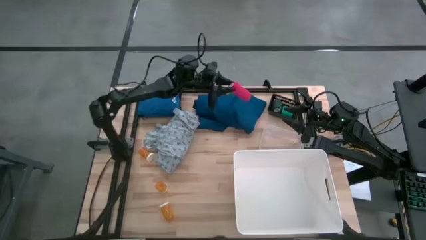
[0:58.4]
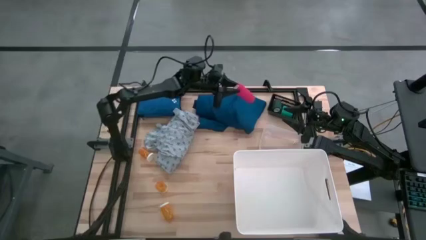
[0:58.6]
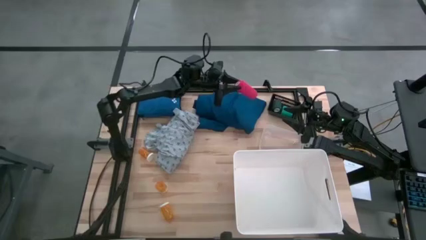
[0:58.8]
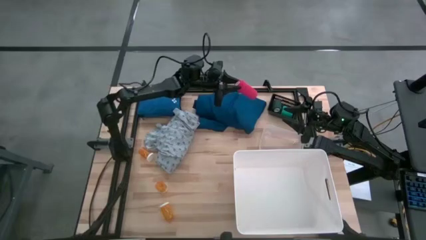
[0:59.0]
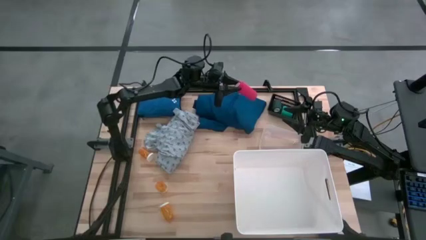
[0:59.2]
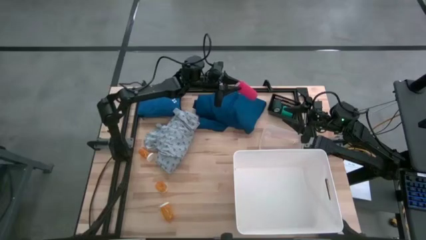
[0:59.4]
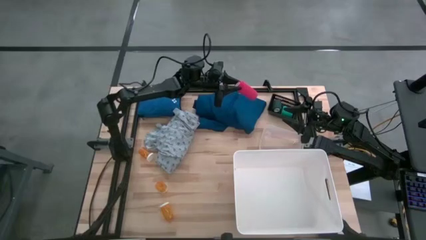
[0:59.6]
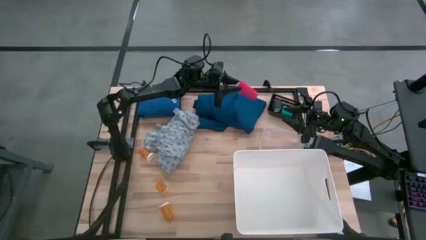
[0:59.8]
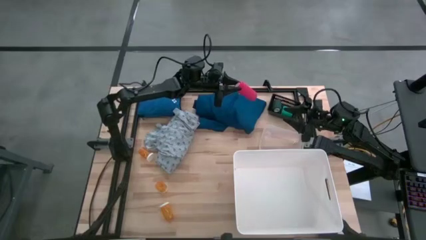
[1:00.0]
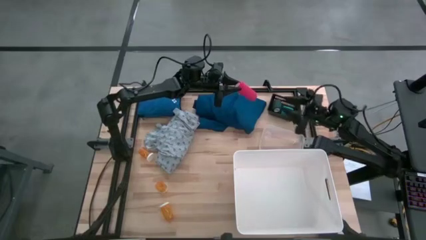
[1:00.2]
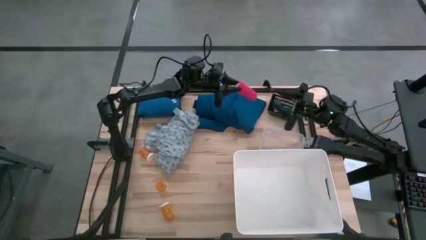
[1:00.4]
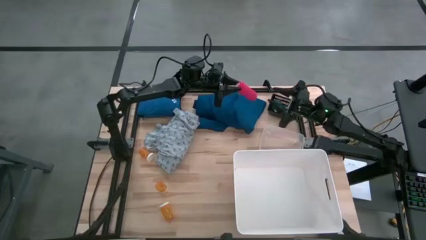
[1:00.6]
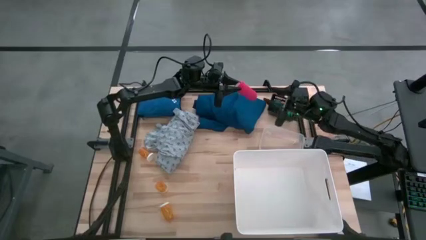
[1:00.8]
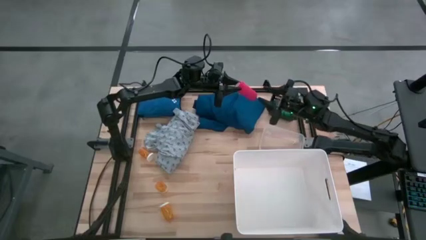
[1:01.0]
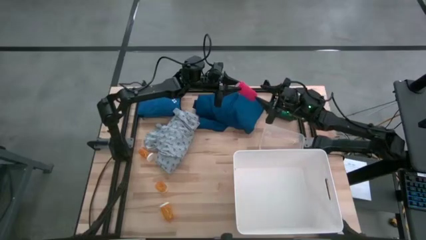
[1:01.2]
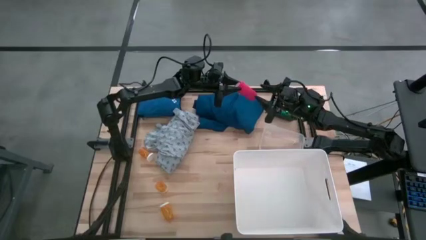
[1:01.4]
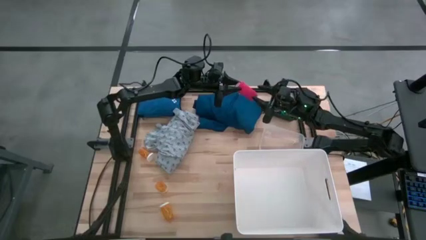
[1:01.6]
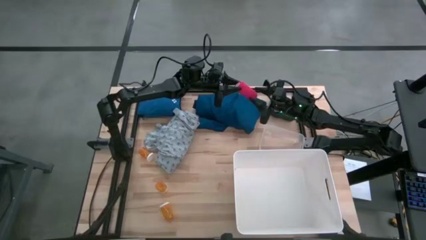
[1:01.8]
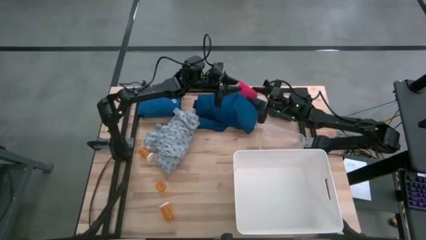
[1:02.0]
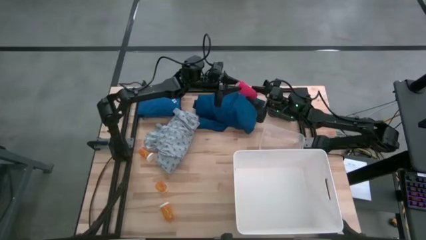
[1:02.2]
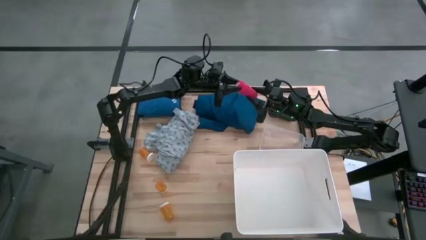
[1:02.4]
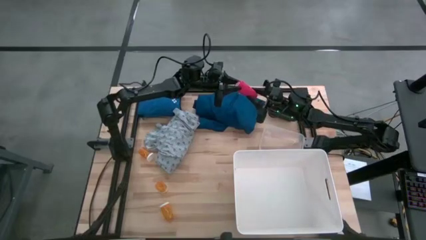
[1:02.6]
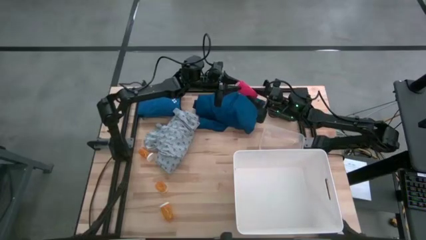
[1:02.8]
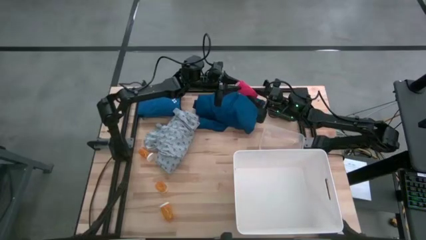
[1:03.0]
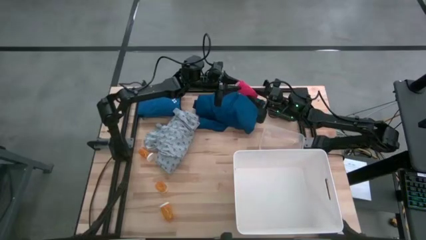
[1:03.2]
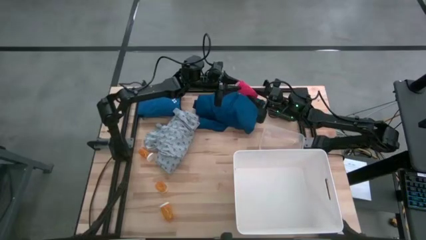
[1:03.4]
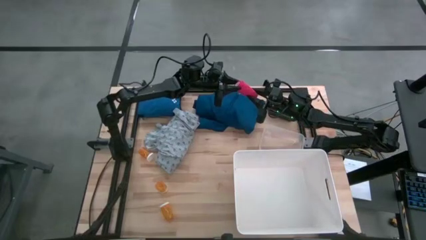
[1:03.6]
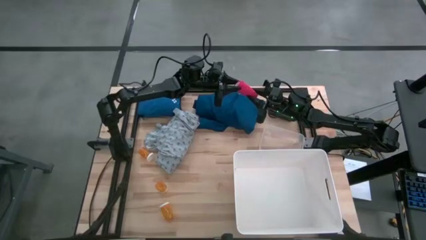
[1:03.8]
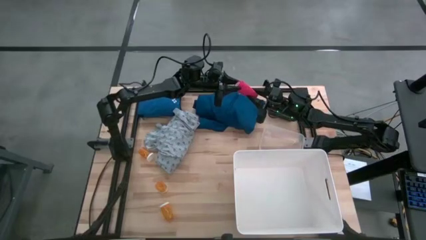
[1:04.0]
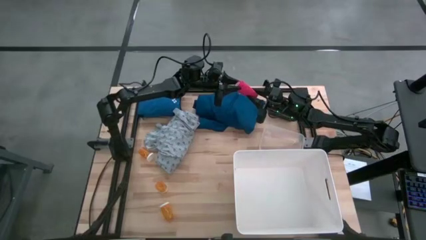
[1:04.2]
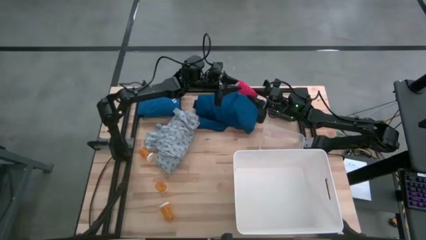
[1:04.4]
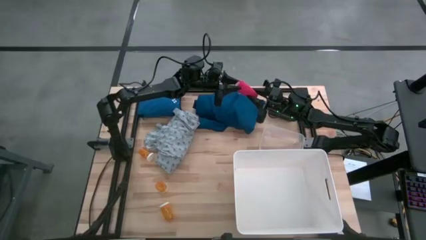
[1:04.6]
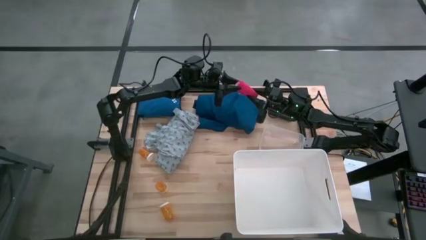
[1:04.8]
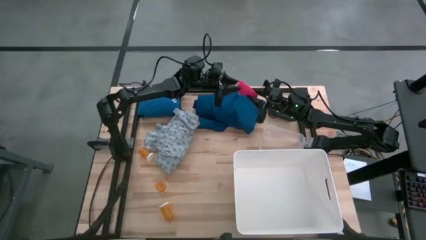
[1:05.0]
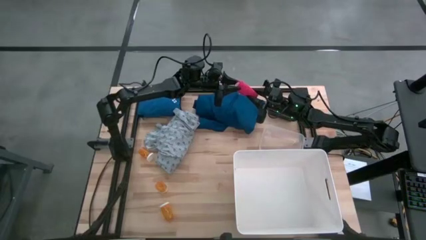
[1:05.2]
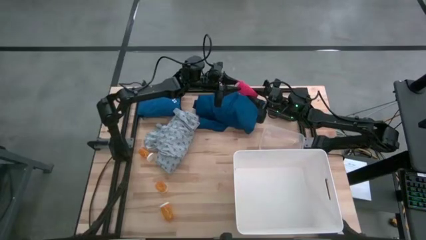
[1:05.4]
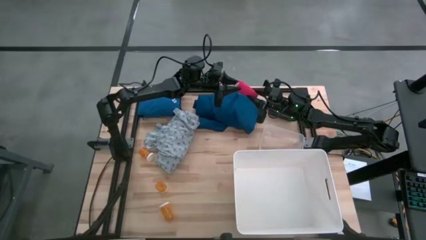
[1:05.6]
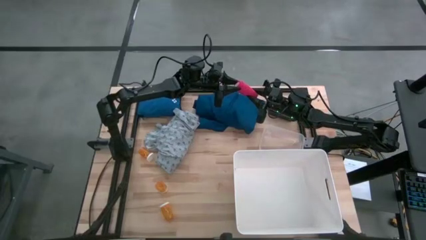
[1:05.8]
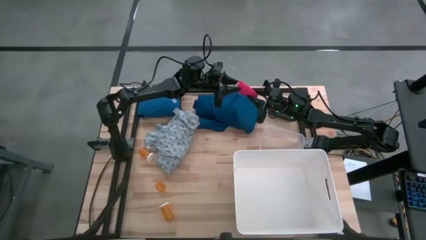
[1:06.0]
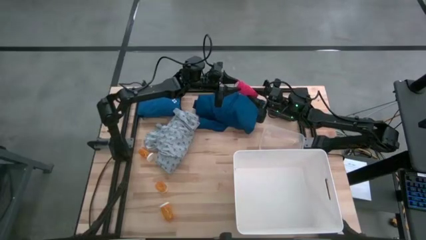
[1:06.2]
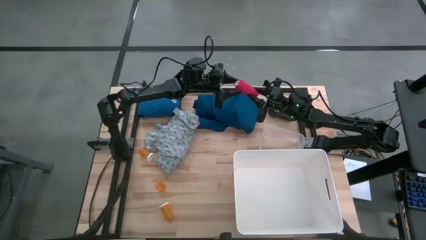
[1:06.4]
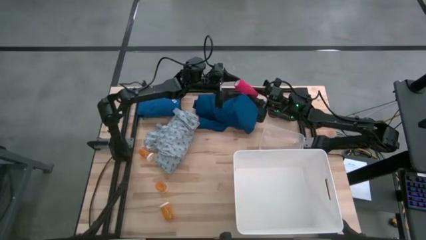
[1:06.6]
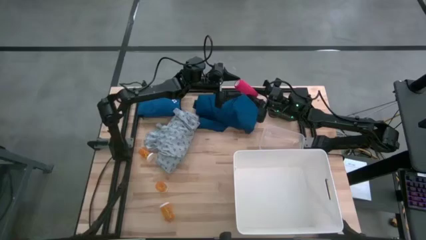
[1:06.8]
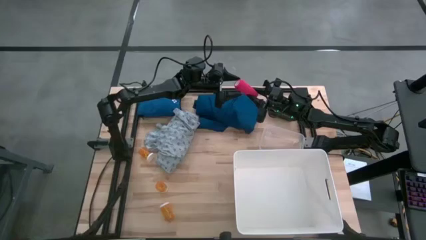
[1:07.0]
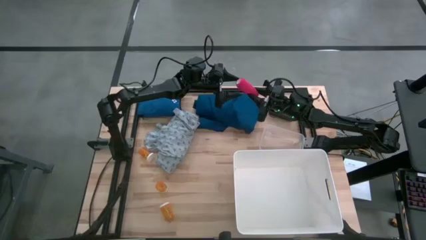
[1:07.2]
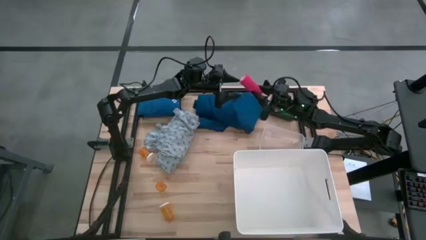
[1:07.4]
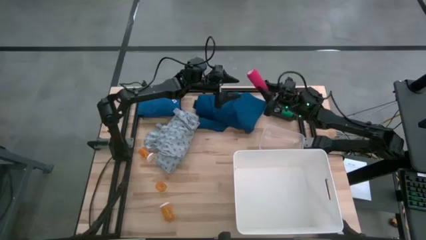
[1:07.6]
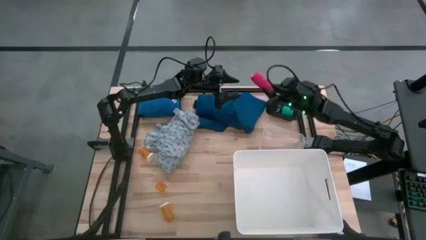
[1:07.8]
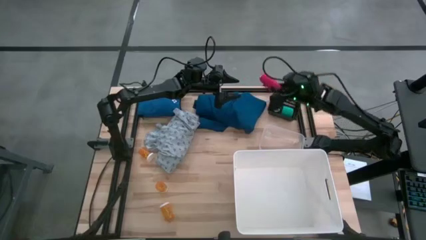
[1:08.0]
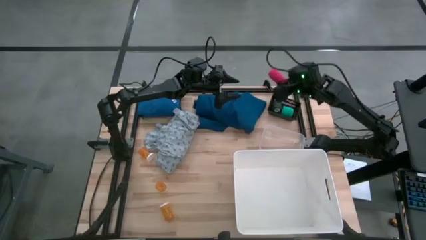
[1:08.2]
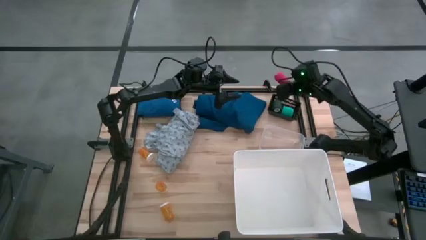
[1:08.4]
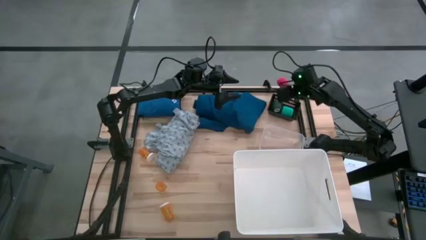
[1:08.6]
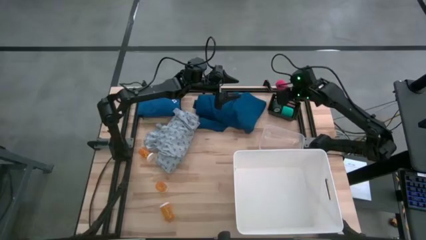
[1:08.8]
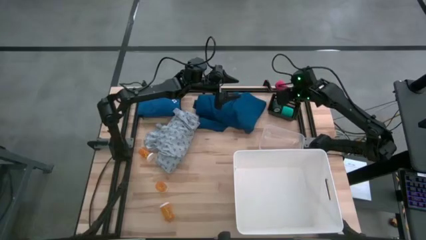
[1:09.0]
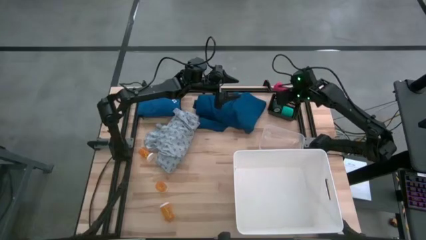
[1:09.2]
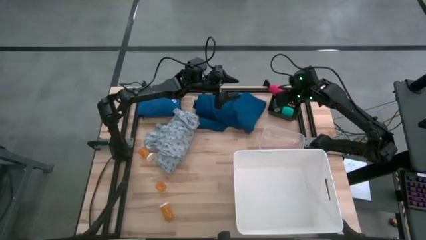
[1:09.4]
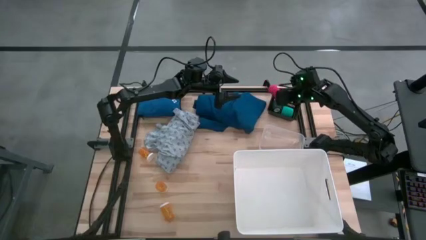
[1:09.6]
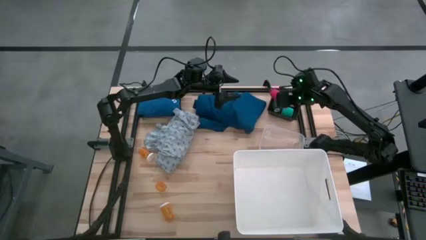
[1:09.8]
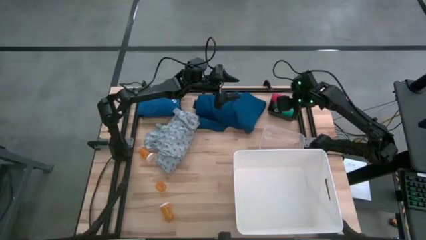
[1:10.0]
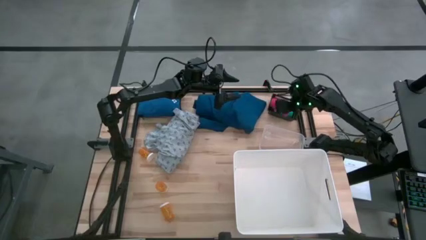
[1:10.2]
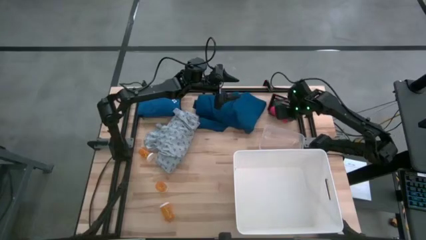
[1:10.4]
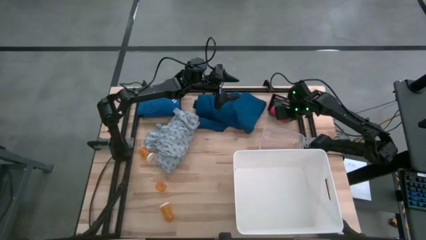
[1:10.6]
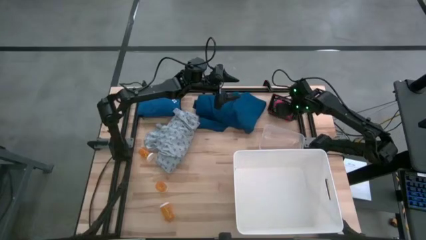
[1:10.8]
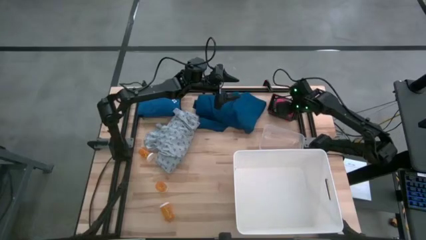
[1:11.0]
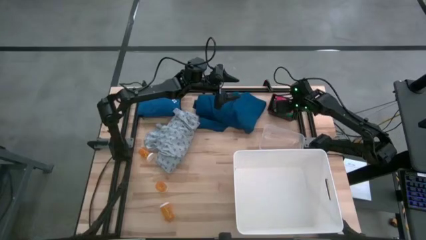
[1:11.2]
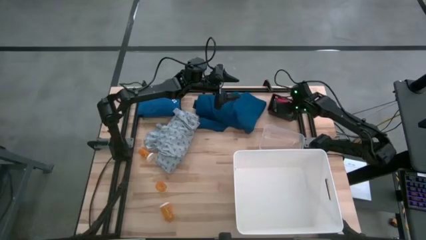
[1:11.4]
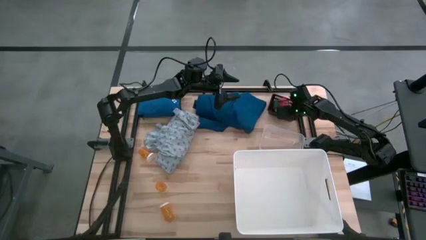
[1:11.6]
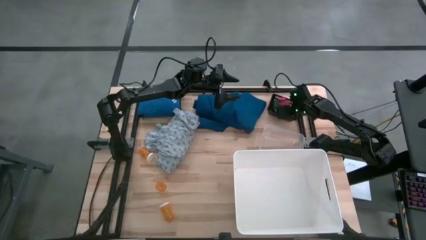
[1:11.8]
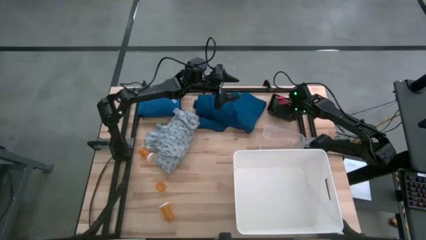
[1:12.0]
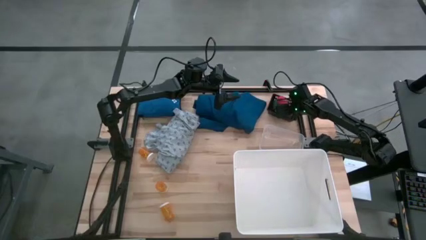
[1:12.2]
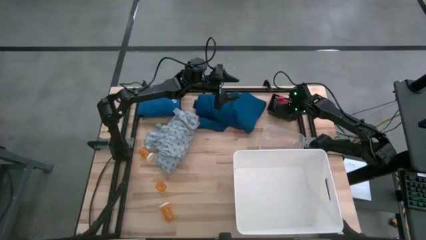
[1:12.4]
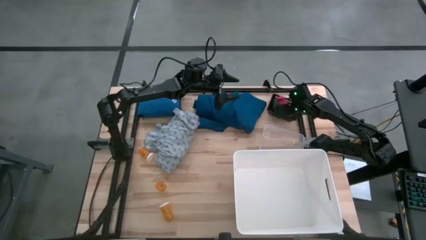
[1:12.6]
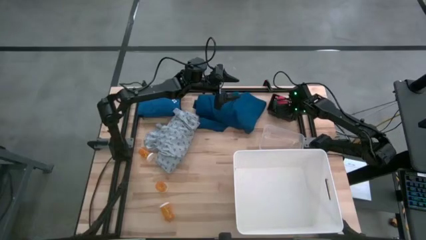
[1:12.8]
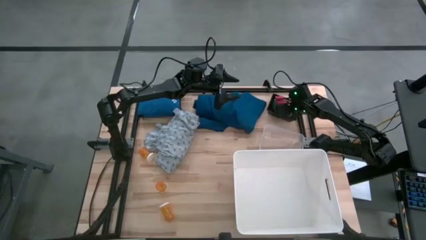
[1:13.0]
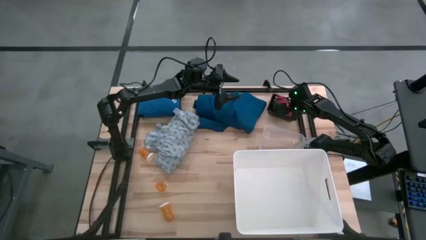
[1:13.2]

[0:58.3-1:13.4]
Task: Pick & place medical supplies in basket/bin
Put the pink bandage into the black bin

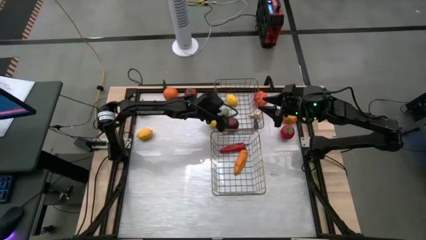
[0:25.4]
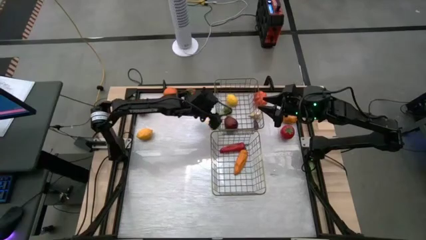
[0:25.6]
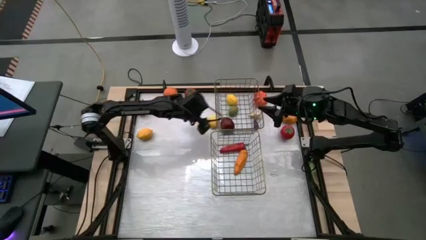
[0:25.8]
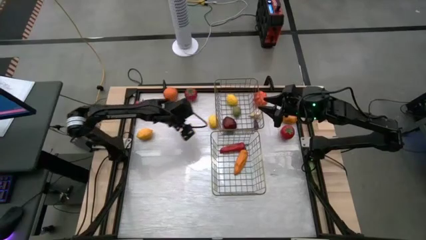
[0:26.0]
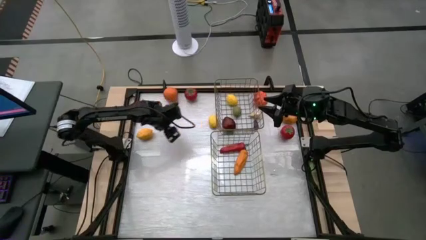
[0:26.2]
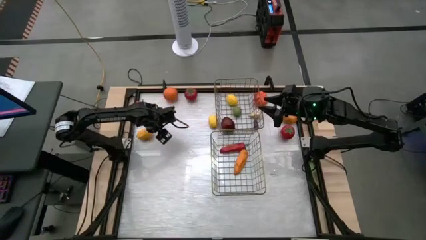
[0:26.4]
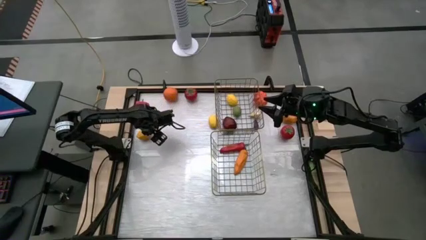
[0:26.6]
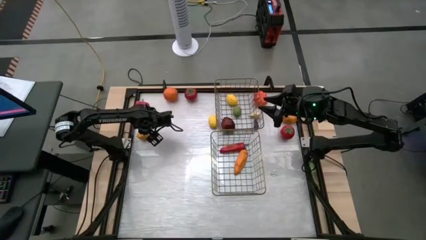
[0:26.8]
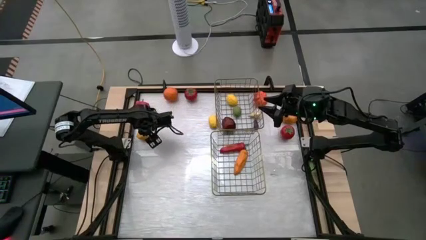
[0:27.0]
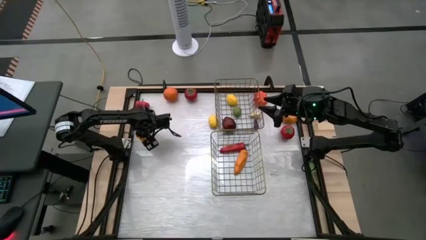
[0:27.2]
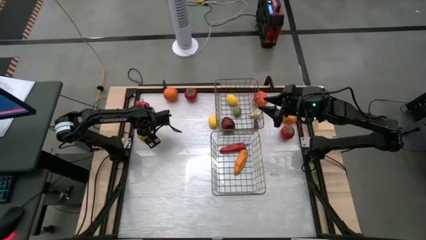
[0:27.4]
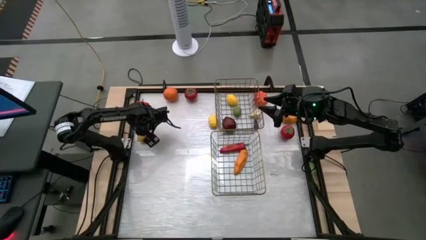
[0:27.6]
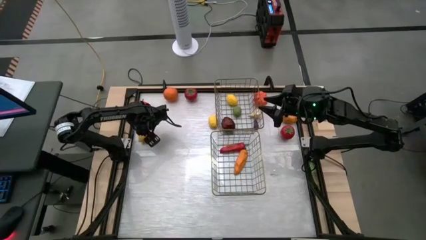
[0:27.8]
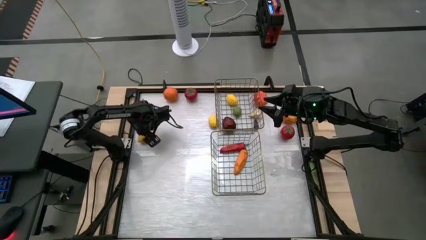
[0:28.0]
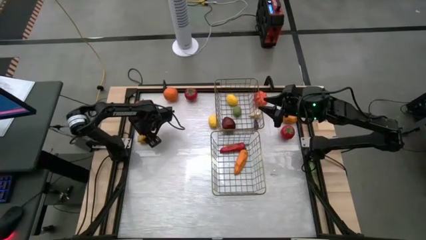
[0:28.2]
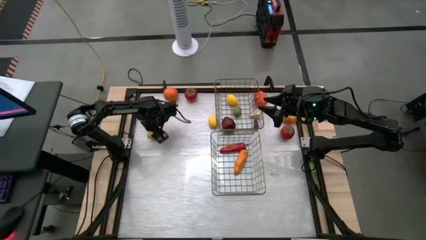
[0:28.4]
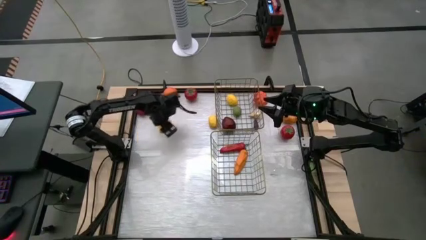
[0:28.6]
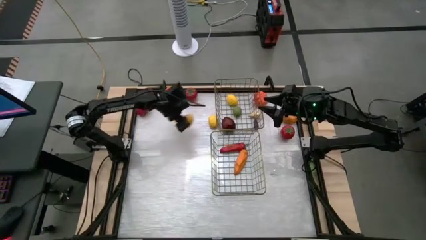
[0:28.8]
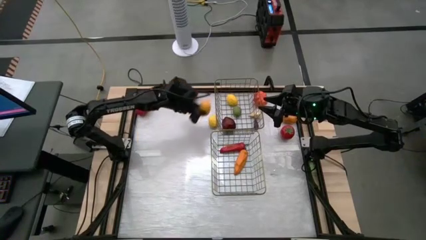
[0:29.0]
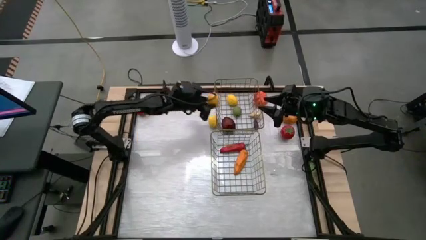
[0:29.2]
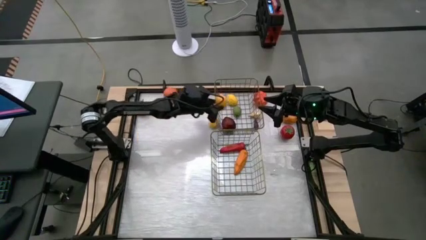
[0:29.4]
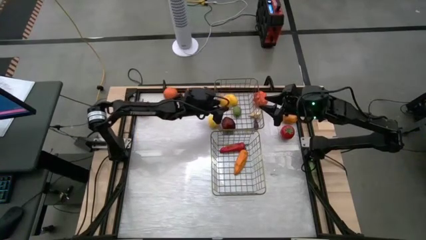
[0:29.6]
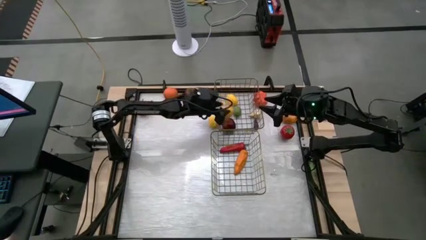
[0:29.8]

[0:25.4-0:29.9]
Task: Sort produce into baskets
Put the left yellow lemon into the top wire basket
